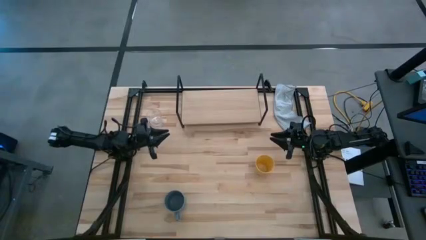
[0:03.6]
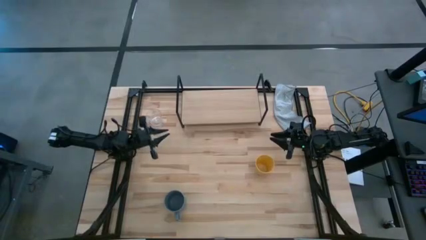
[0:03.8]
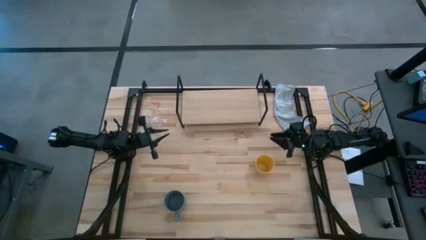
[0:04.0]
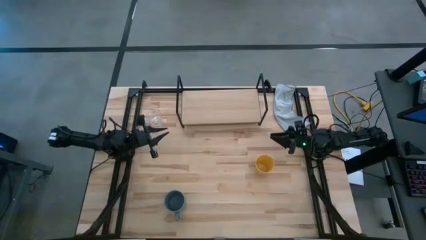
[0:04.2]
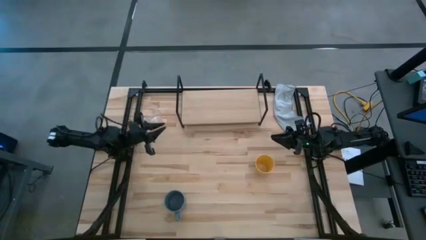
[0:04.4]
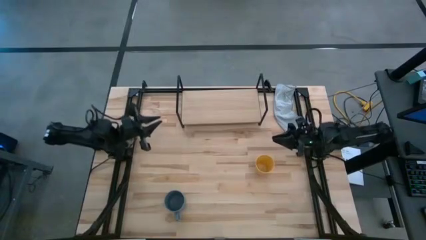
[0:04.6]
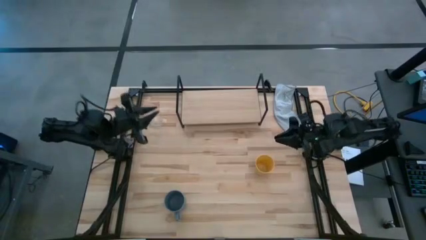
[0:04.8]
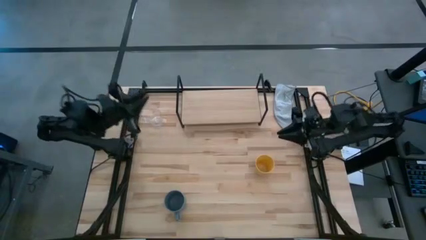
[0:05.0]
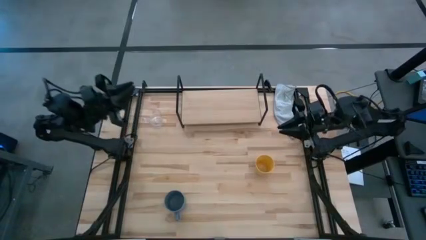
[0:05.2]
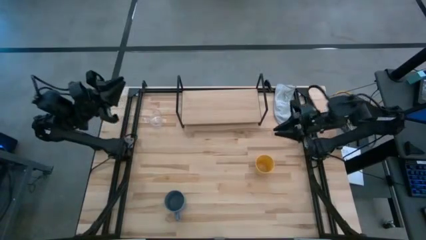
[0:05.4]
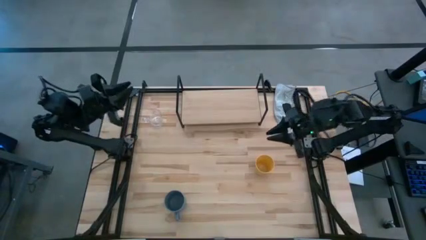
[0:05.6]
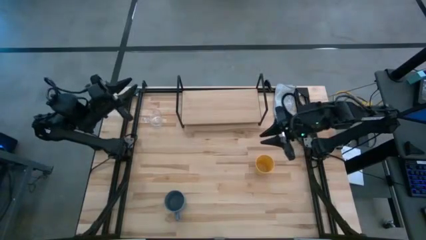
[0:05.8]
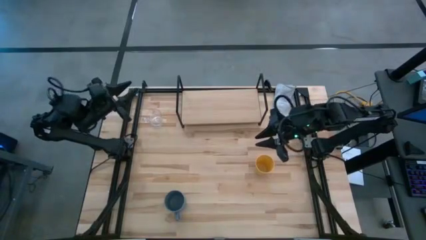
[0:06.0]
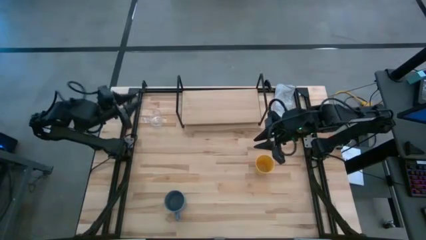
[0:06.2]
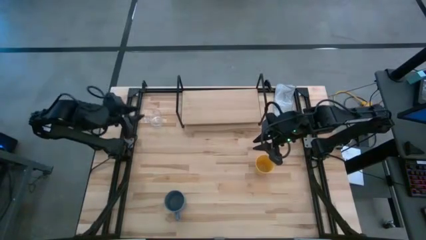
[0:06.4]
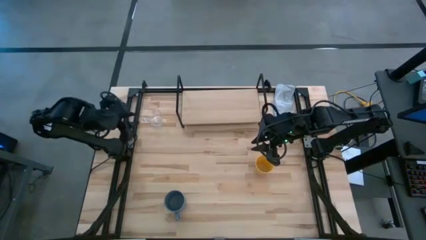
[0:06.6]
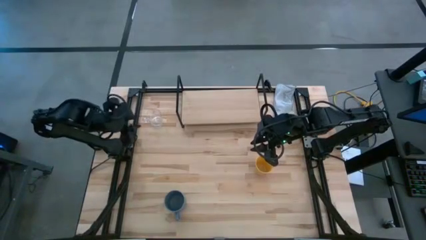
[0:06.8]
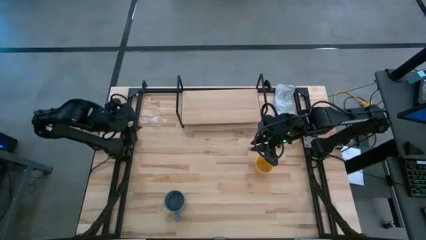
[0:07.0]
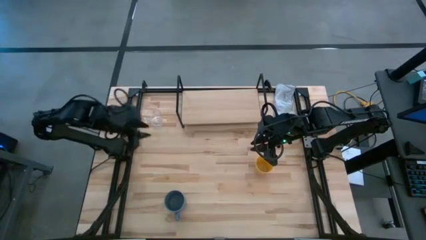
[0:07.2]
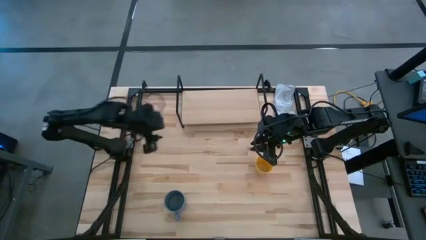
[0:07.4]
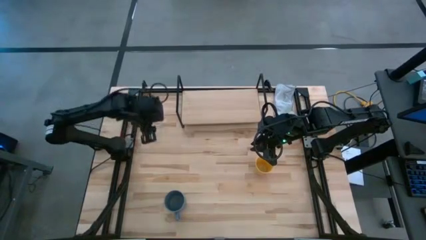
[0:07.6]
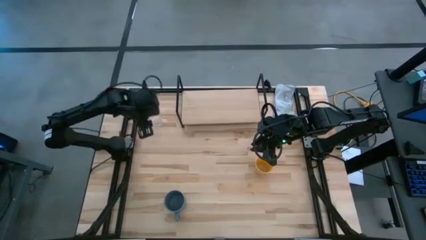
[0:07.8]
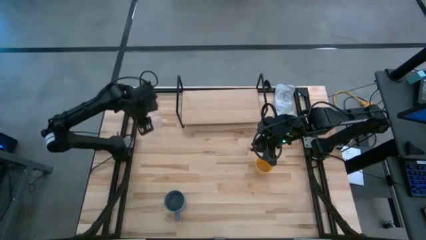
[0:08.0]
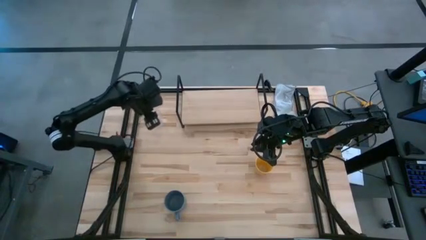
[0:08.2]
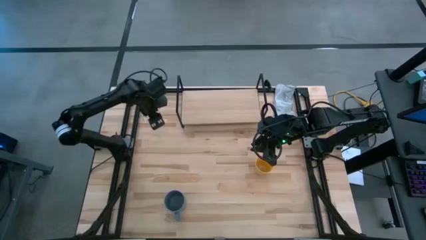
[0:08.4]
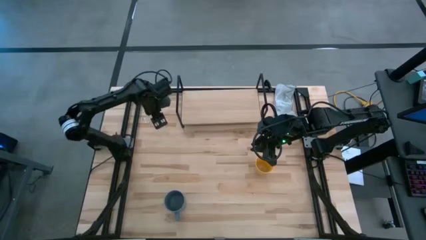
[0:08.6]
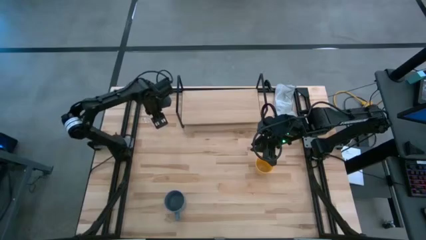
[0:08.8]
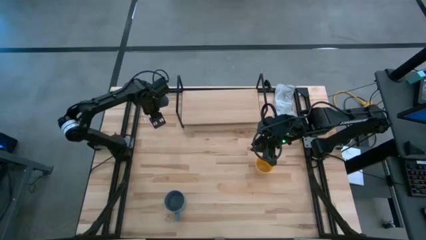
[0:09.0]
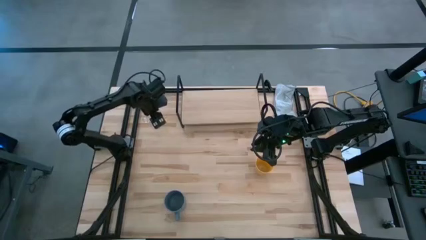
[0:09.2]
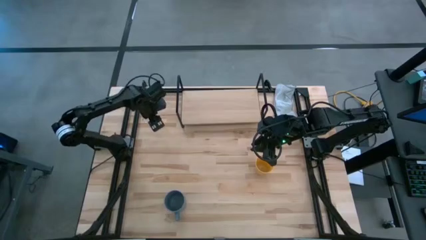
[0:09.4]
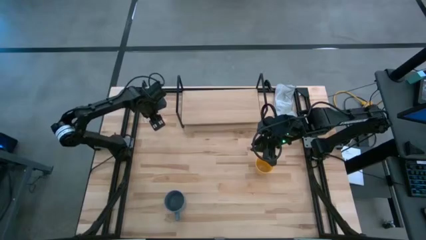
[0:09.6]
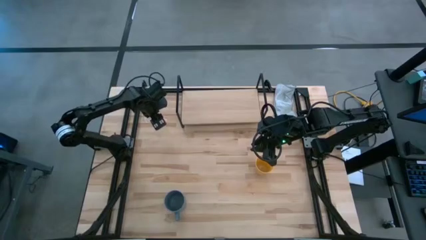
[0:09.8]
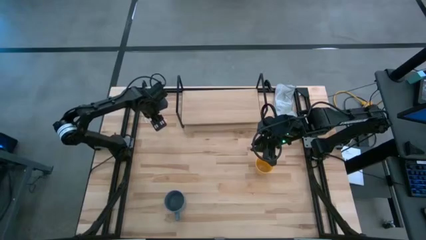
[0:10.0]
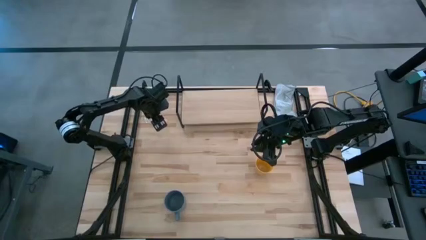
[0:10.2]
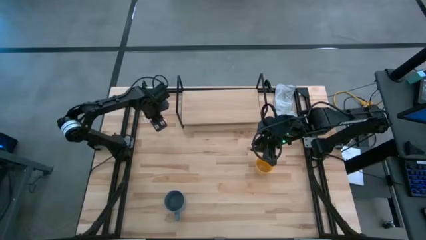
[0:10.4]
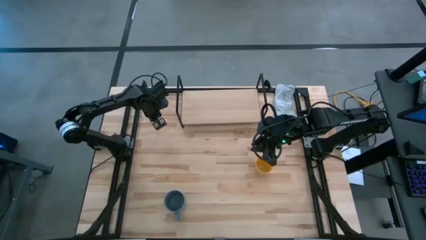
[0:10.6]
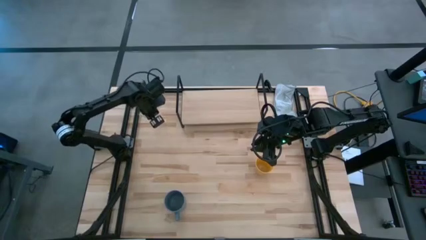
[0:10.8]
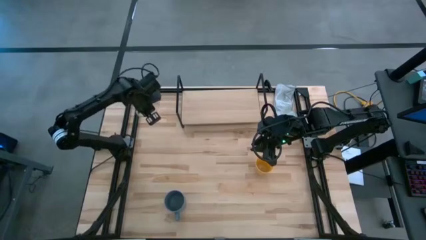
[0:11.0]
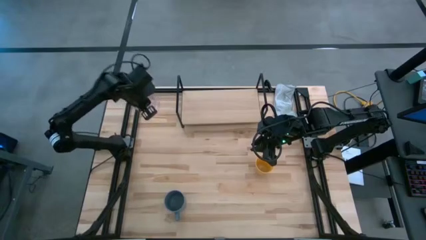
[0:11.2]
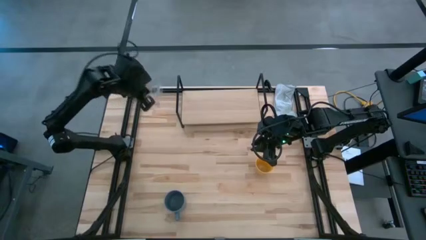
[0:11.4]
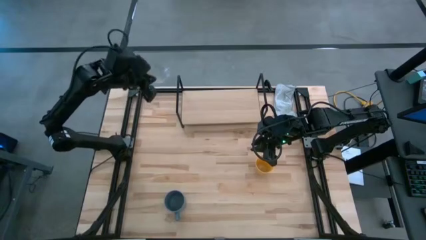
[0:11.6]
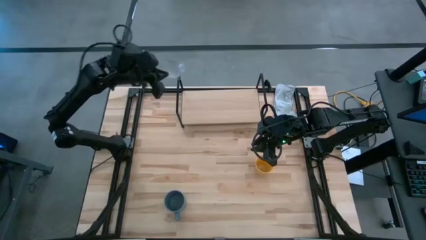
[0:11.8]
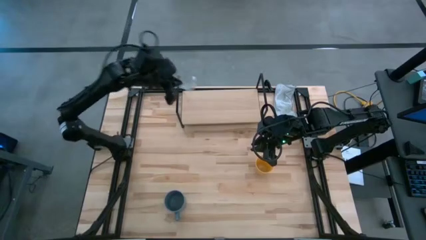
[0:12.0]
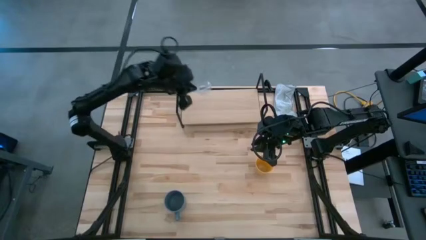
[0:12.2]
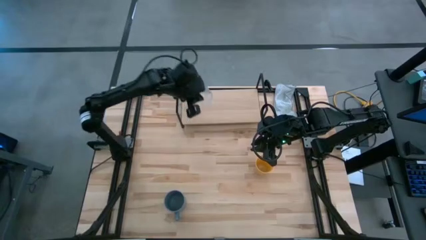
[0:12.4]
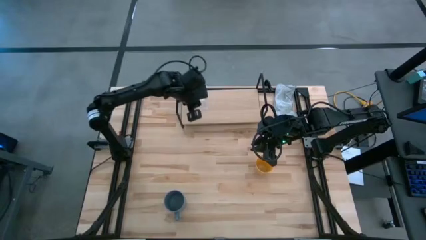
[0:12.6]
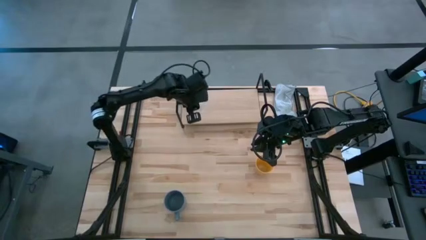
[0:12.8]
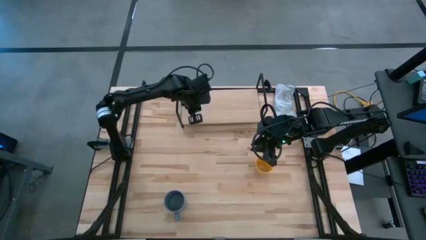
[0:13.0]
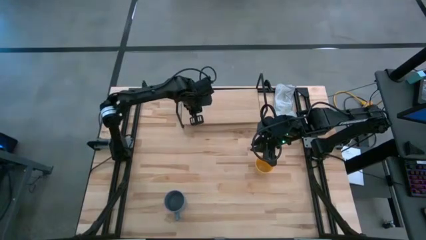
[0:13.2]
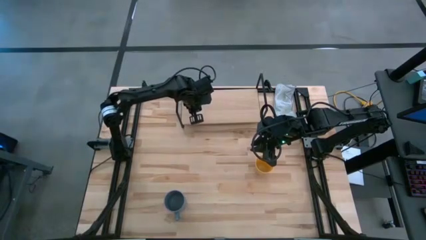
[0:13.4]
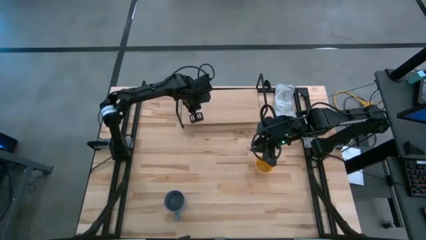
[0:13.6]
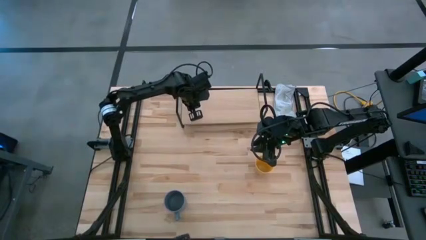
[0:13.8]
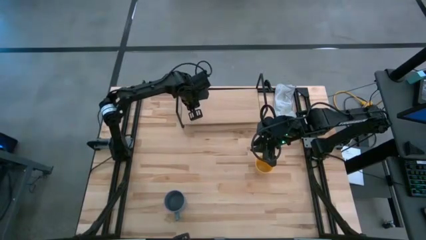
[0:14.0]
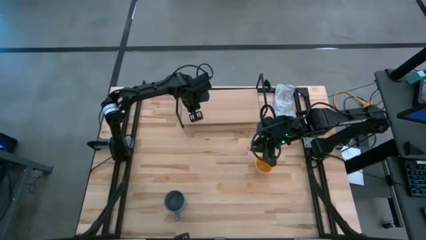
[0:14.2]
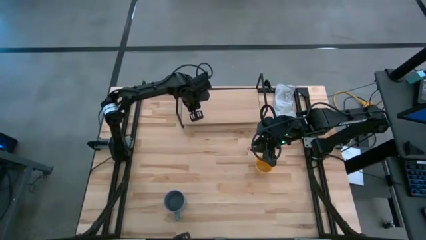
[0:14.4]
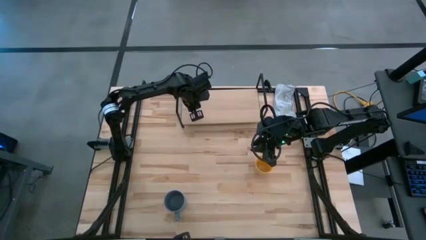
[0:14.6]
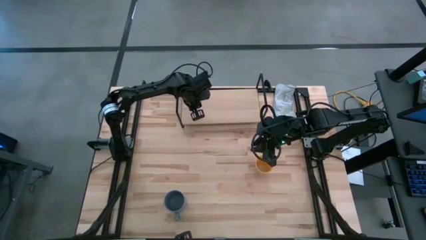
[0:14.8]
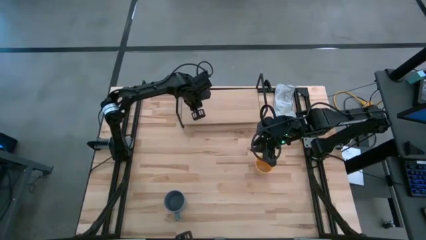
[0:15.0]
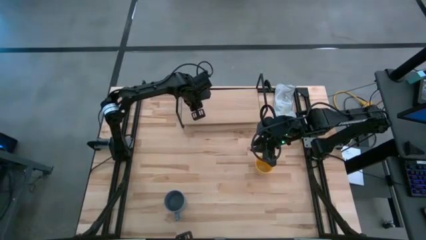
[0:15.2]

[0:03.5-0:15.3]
Task: Stack small to large cups/mugs on shelf
Put the transparent mug on the shelf

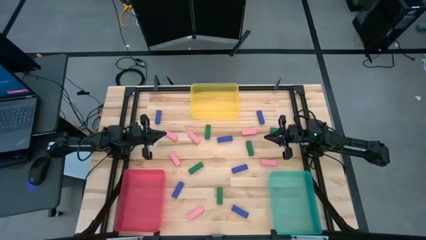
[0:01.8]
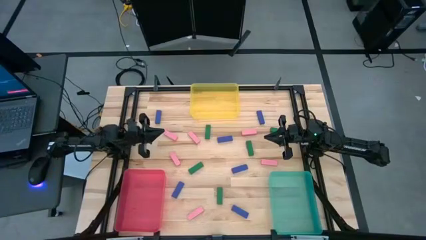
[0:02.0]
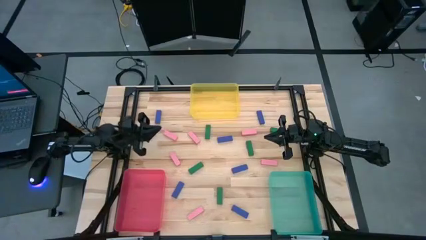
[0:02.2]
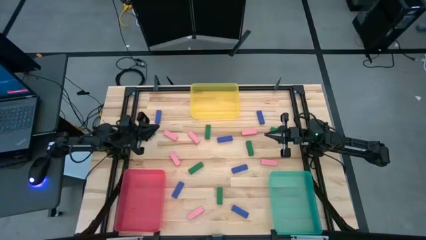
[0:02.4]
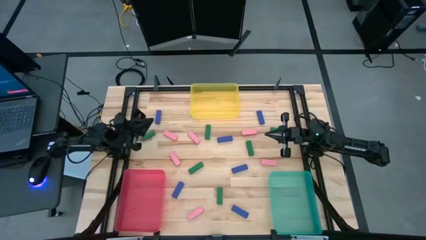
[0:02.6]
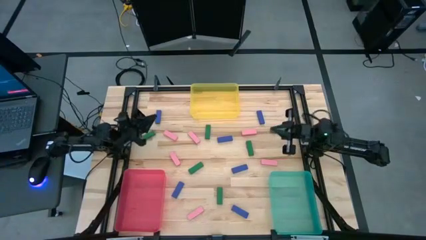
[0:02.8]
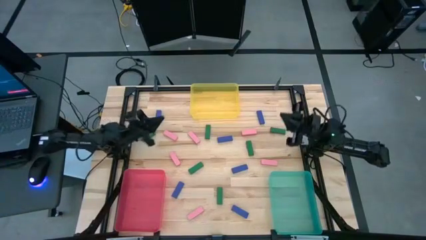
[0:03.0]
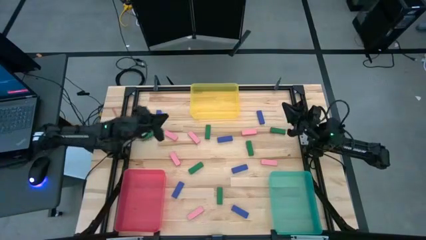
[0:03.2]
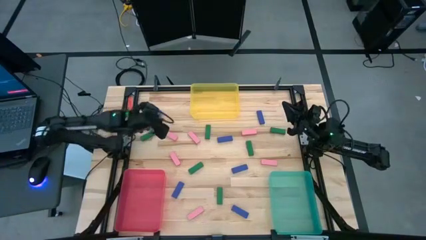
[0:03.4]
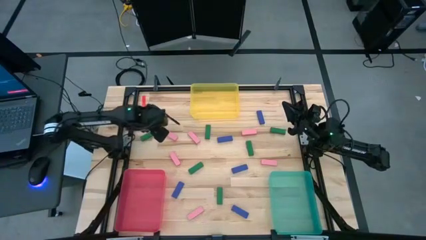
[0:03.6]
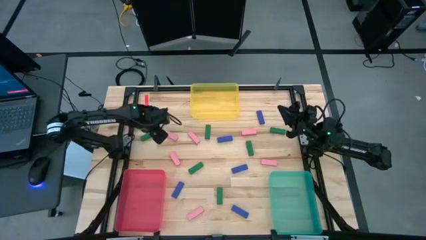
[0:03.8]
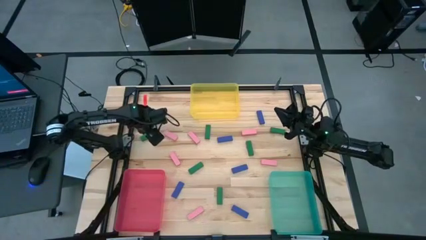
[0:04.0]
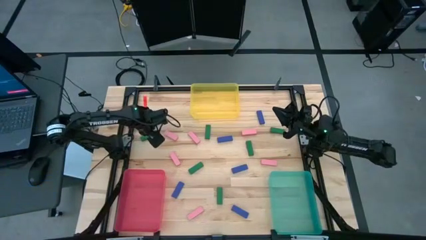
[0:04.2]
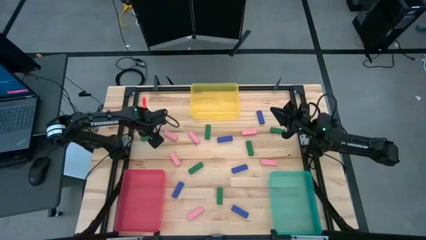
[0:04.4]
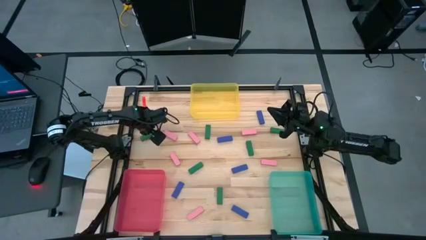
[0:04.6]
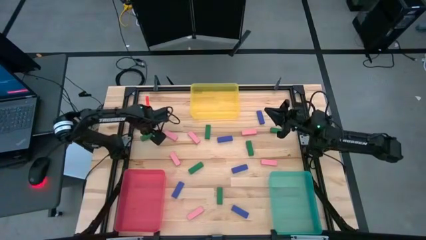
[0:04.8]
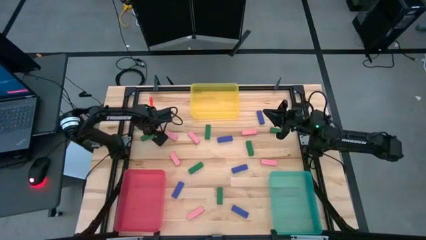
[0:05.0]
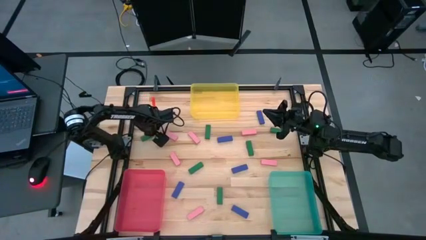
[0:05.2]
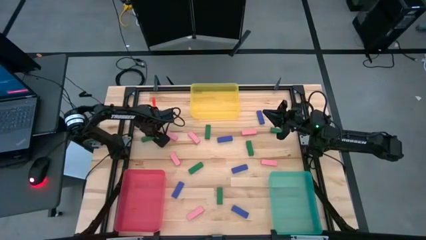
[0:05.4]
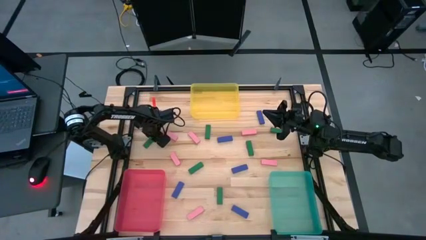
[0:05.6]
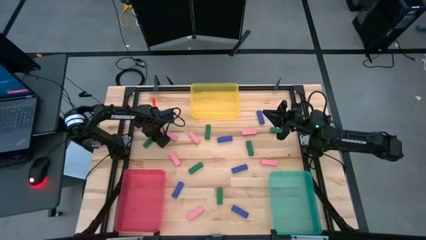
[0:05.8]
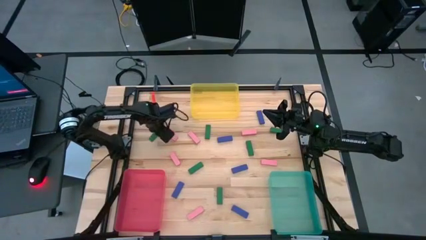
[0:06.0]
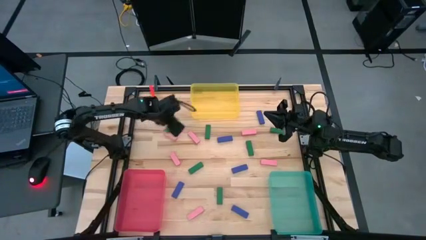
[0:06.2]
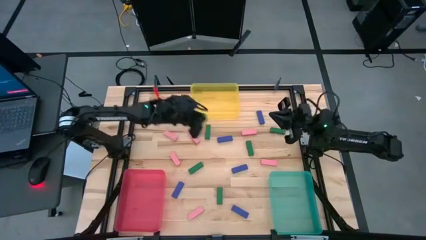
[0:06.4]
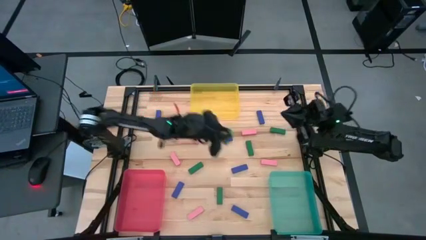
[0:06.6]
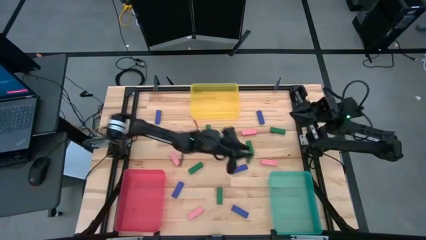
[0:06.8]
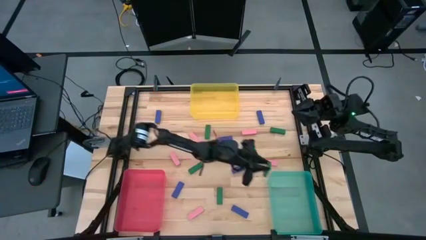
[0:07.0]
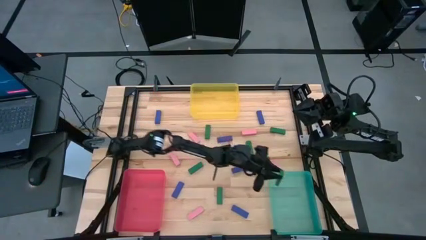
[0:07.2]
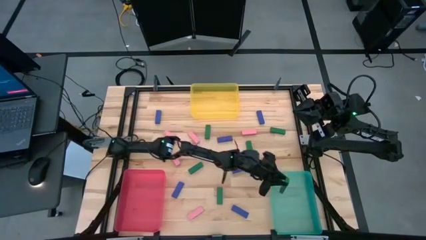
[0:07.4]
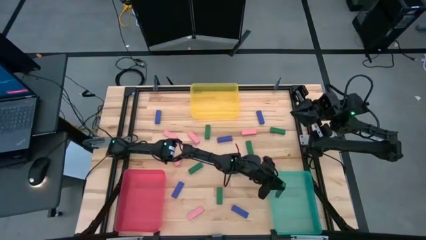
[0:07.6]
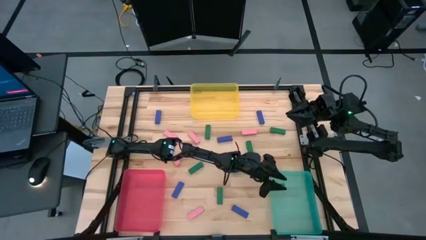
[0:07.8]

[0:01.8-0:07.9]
Task: Sort blocks
Put the green block into the light green bin
